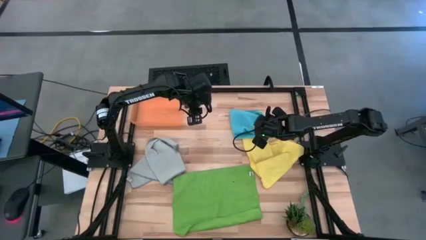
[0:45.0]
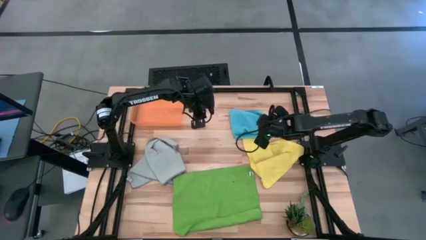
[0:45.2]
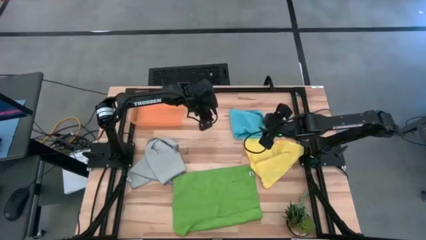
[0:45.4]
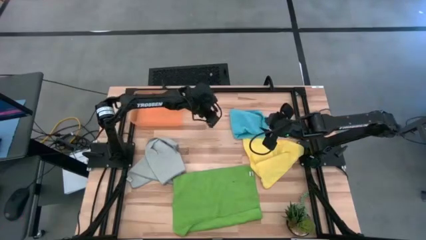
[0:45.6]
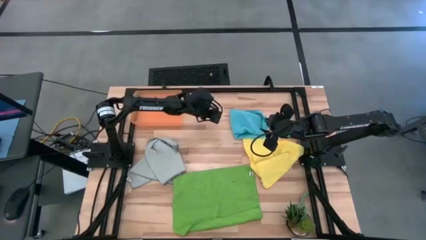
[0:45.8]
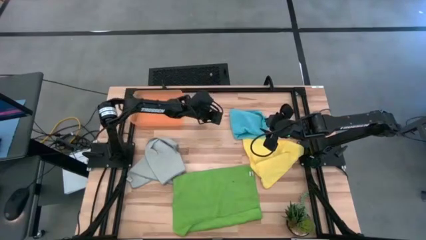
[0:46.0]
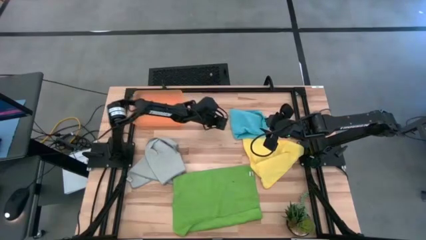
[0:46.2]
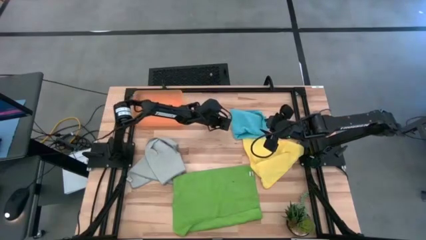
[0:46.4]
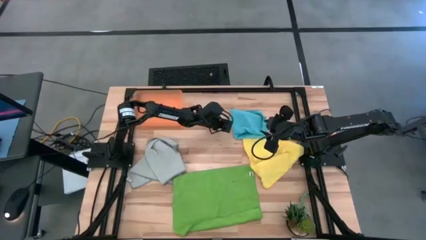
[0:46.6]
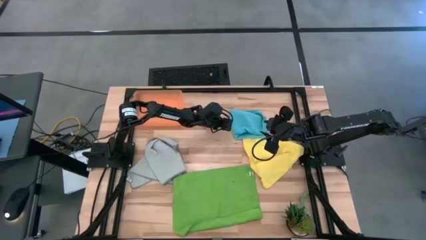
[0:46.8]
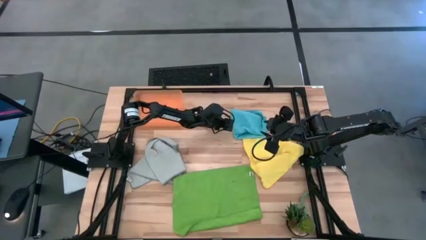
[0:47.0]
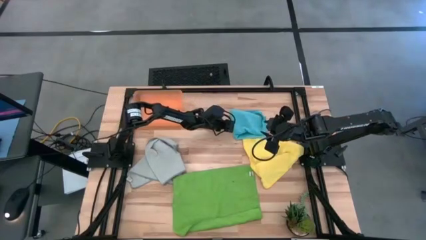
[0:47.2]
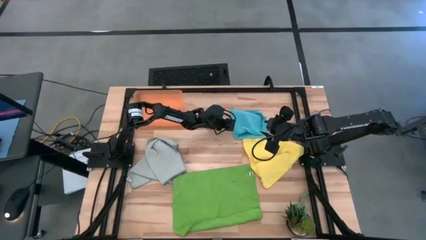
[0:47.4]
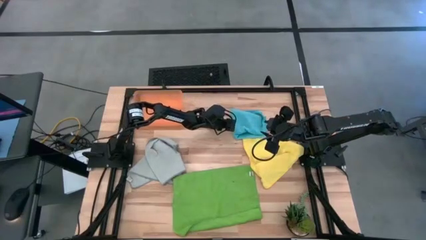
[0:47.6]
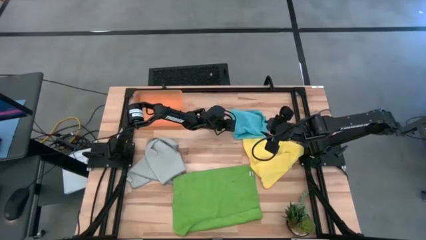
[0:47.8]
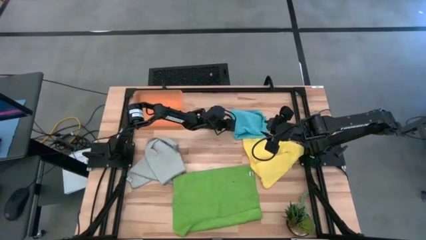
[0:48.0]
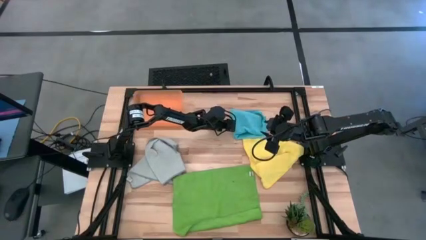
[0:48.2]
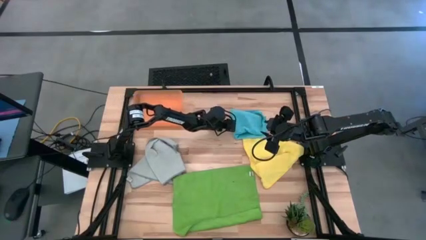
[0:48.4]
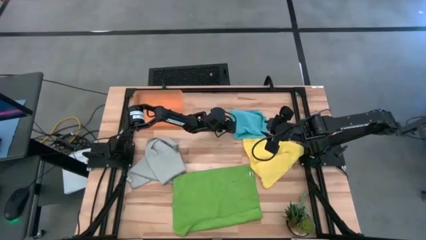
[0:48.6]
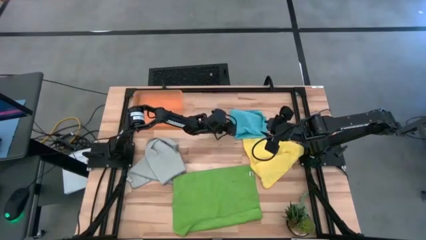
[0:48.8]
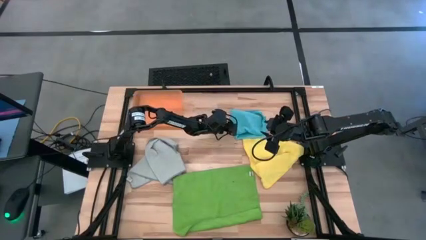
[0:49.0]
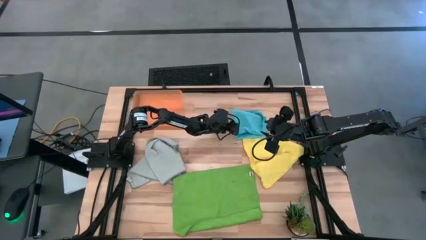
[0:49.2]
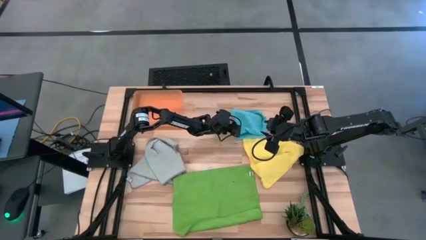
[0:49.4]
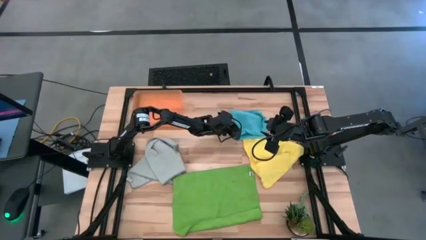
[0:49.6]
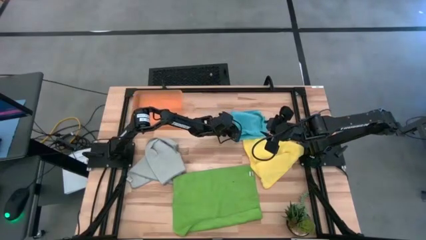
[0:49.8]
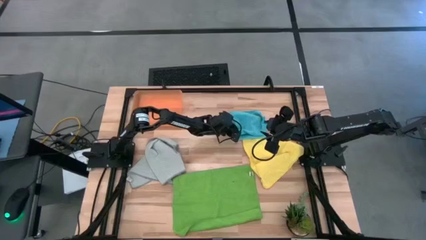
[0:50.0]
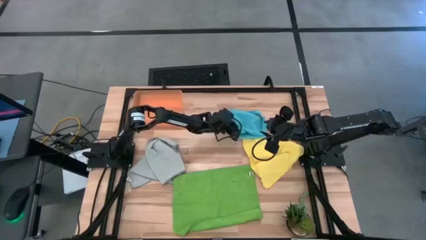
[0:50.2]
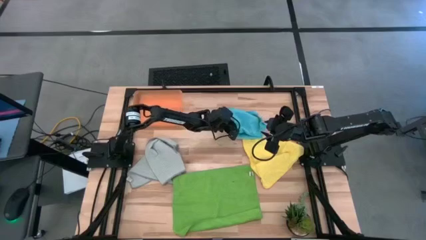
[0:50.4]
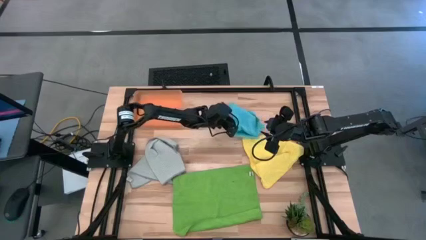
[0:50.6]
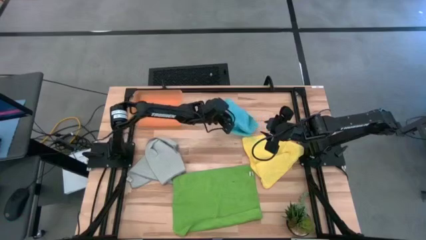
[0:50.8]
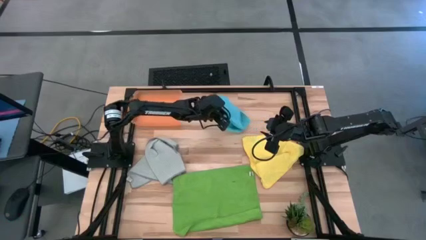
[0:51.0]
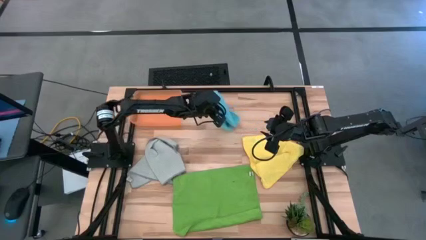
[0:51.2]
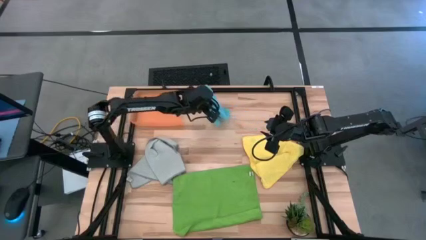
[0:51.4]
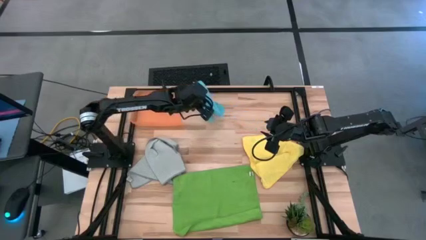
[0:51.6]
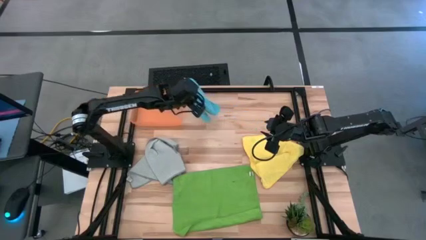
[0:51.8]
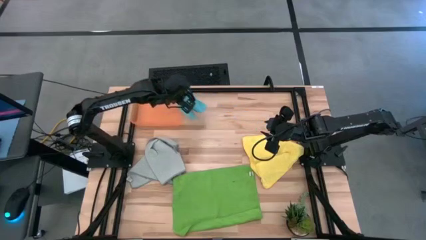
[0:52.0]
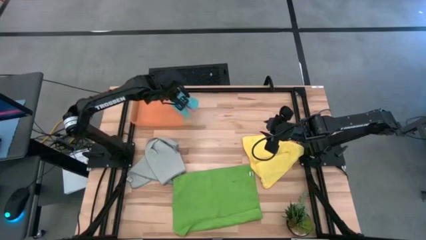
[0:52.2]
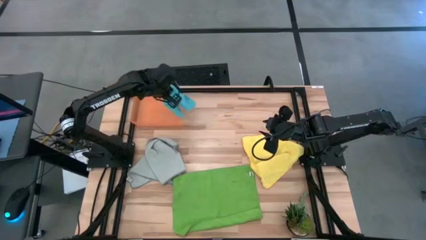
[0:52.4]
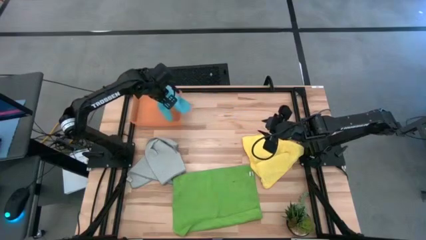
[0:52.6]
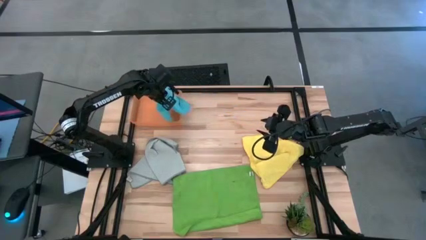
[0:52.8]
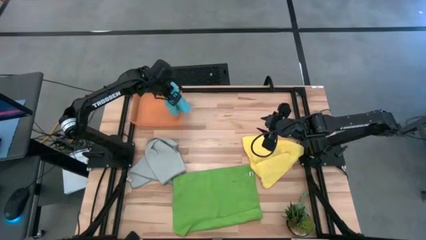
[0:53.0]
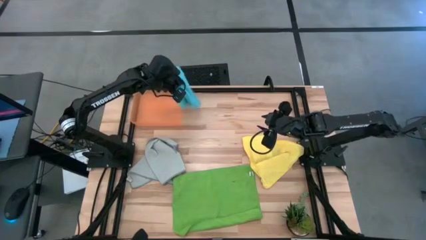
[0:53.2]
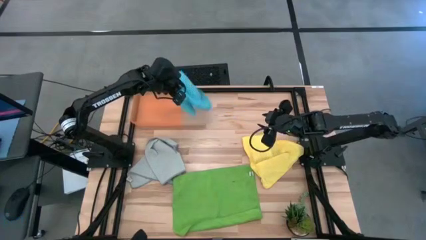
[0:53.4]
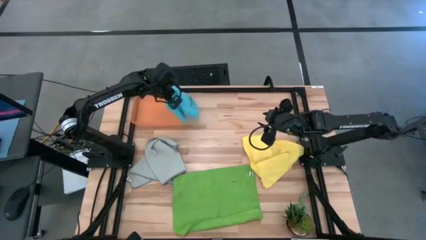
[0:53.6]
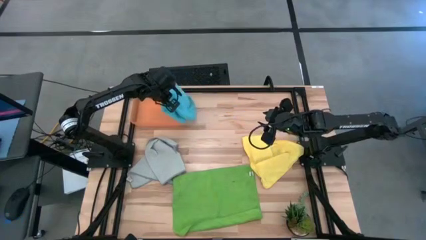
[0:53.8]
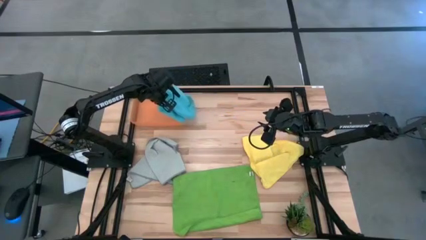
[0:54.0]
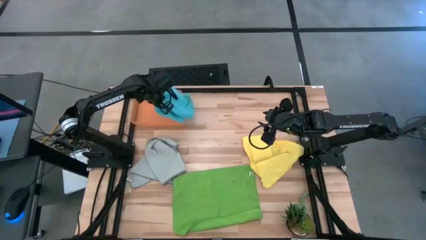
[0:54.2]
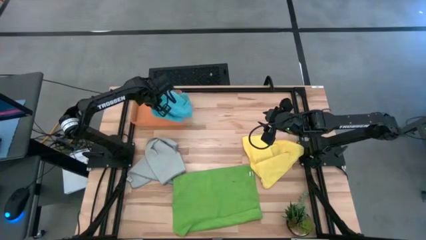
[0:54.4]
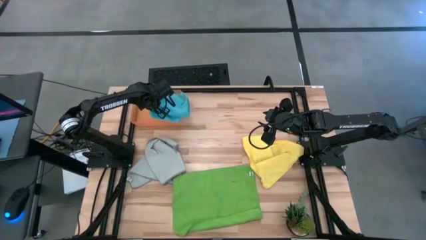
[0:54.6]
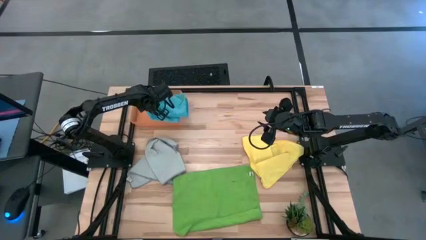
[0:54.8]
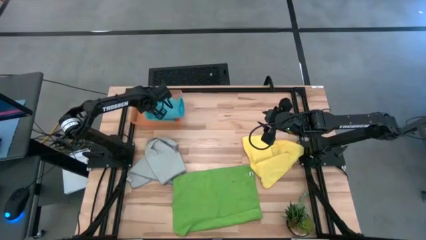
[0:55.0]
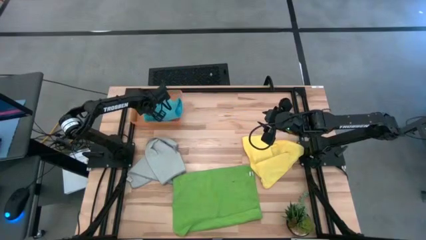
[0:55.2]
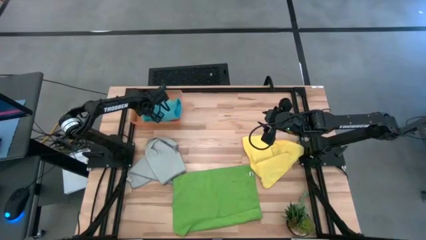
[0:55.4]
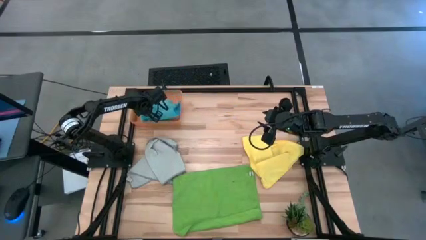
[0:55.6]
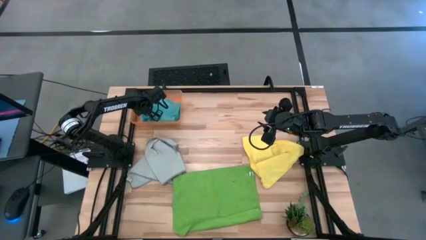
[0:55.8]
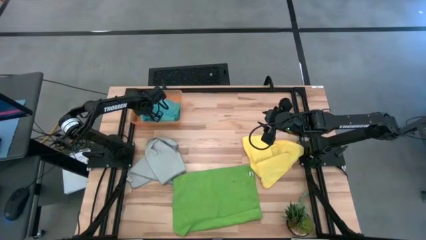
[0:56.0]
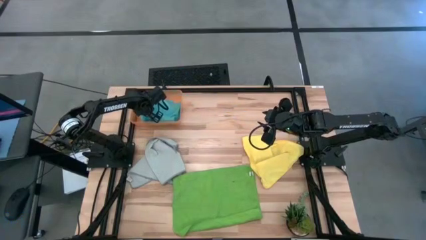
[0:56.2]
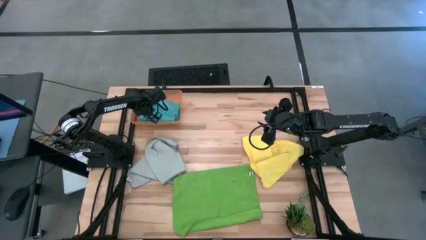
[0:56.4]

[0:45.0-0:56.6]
Task: Fold microfiber towels
Put the blue microfiber cloth into the orange bin

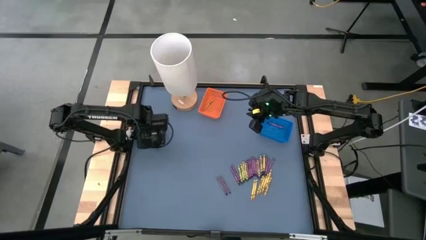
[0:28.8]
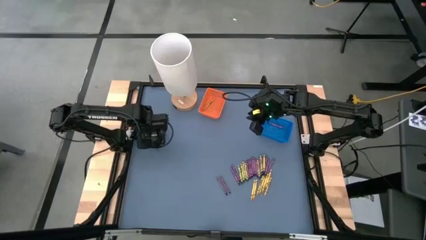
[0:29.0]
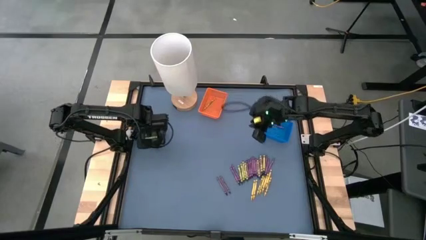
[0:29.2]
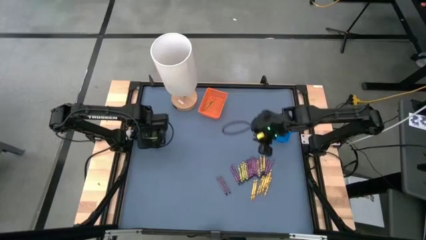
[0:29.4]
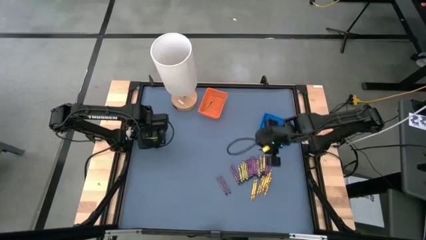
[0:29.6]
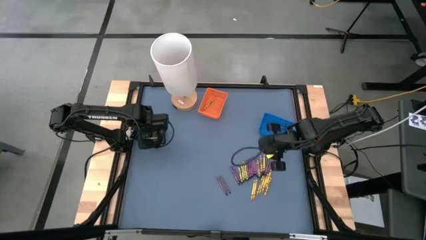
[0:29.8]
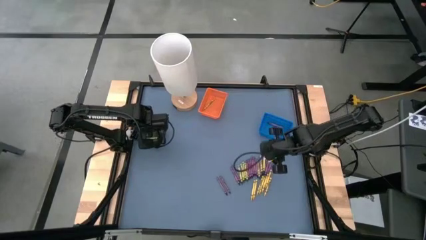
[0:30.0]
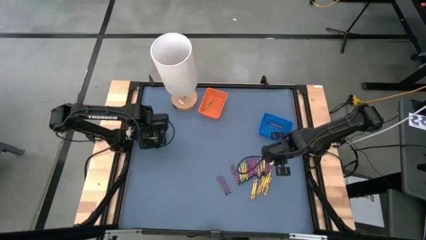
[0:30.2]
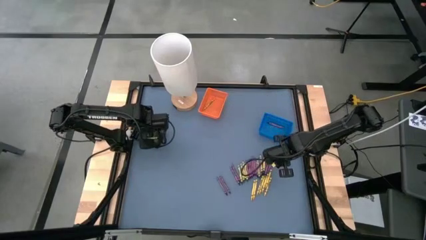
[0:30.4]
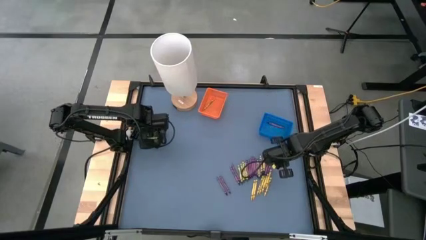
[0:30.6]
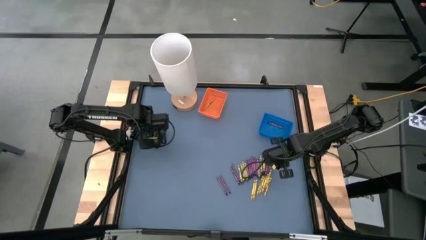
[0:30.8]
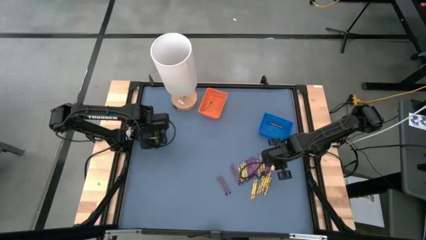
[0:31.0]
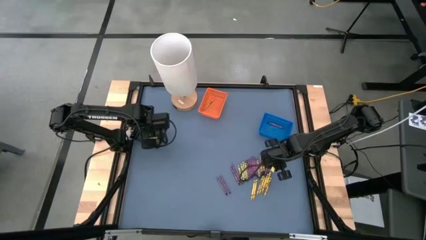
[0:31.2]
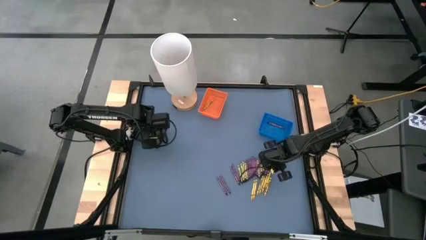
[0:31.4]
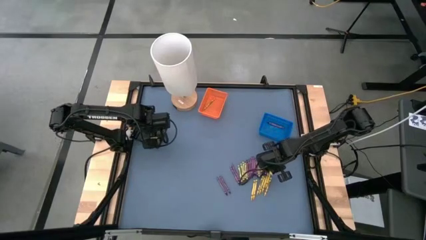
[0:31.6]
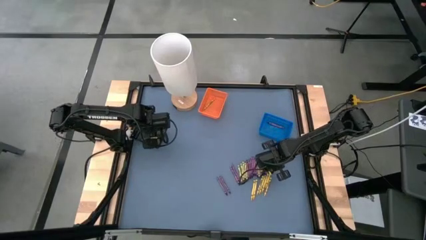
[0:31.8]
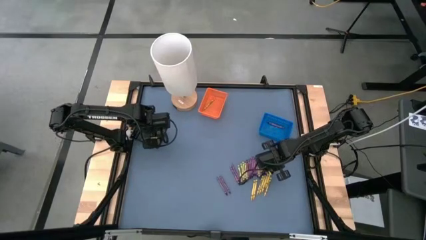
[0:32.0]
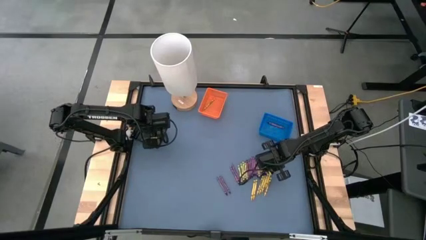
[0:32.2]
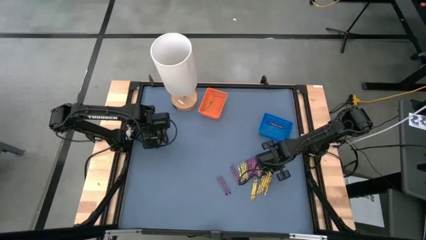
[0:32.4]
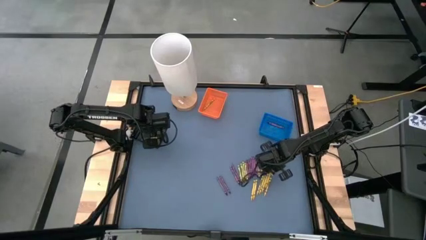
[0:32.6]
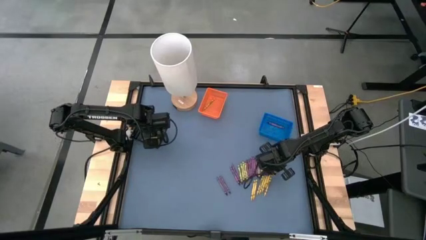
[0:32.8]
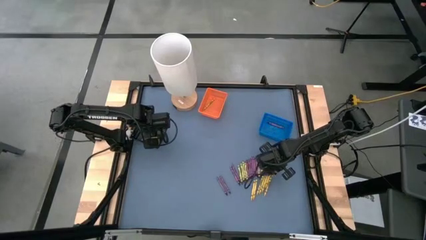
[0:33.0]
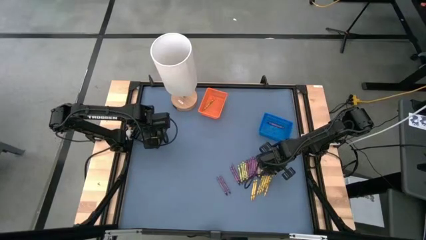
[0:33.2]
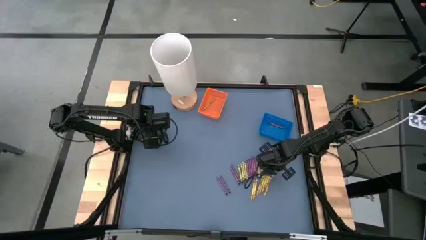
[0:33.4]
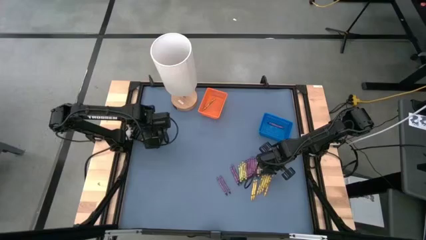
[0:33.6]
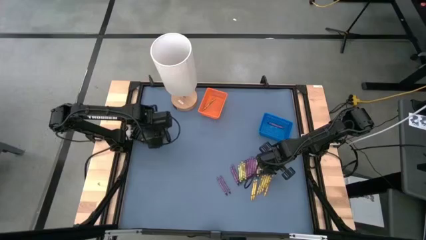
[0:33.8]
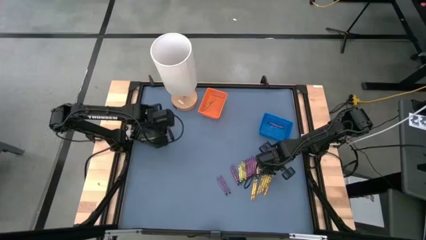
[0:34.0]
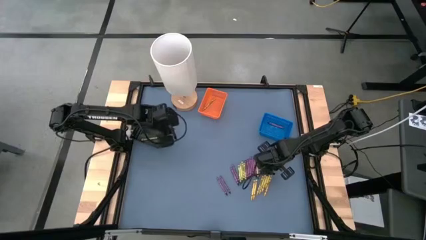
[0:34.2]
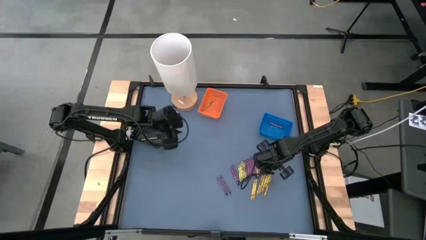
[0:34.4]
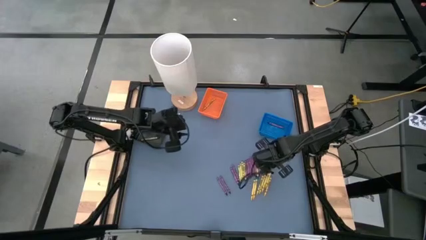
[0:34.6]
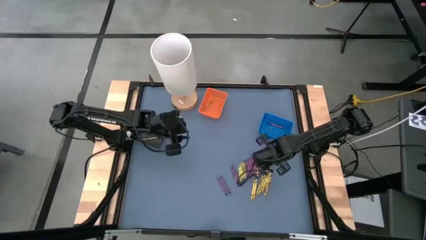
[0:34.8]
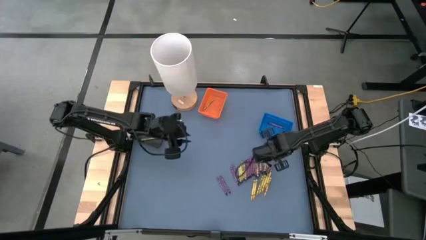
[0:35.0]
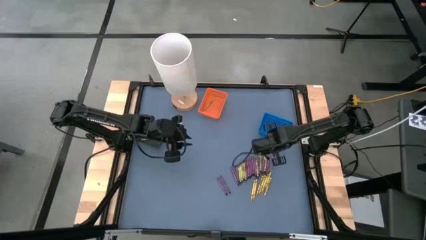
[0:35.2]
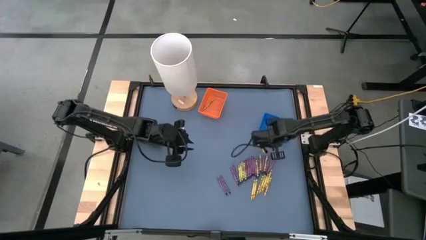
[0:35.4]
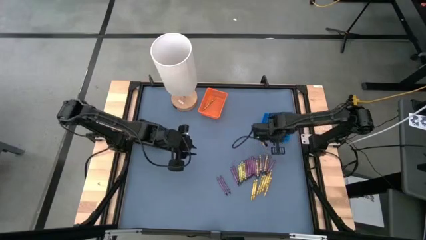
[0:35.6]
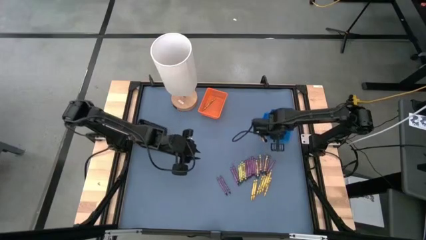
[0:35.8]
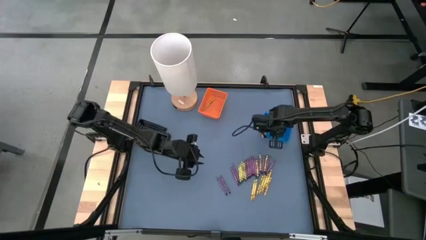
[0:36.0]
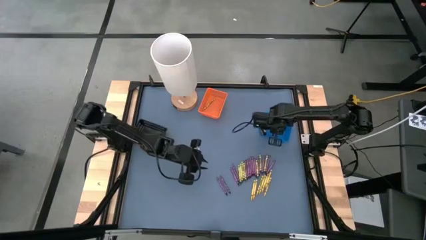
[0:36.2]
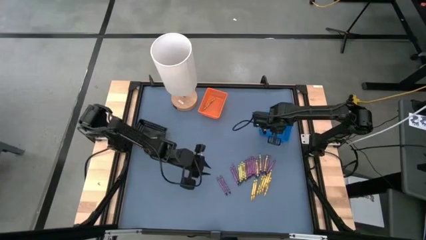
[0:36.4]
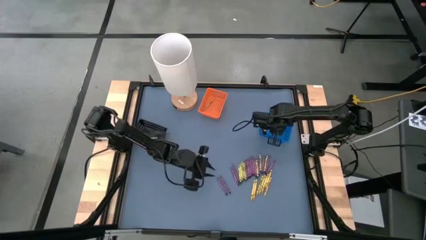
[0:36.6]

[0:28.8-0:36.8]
Task: Sort crayons
Put the violet crayon into the blue basket
